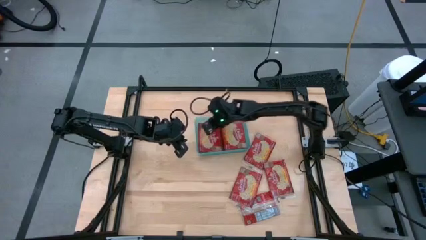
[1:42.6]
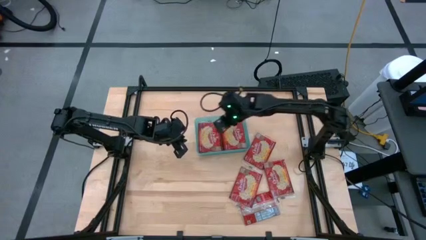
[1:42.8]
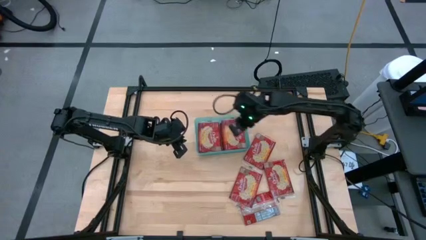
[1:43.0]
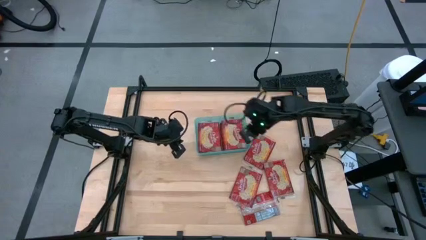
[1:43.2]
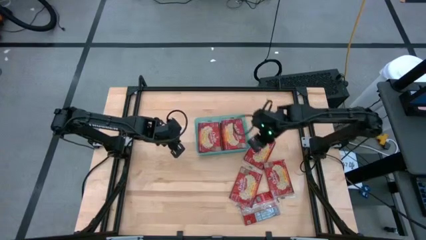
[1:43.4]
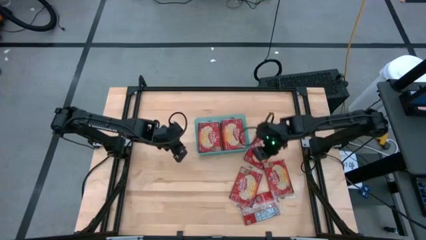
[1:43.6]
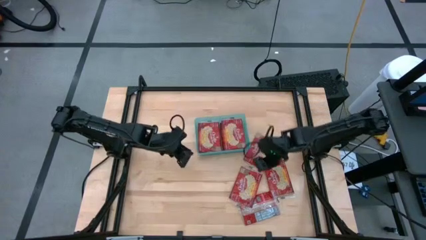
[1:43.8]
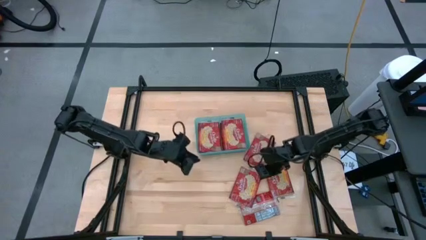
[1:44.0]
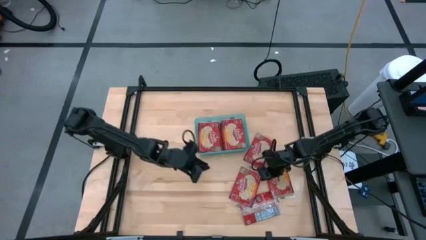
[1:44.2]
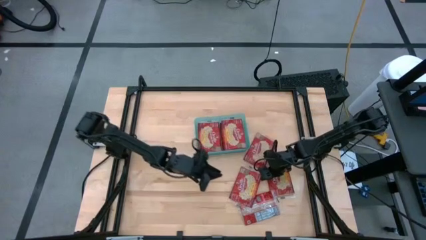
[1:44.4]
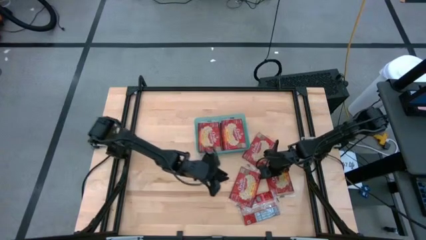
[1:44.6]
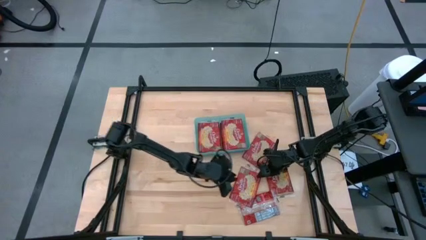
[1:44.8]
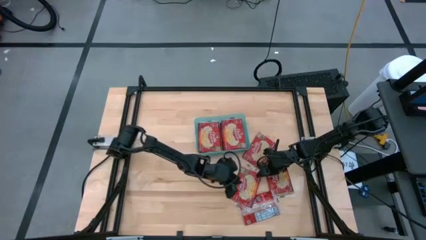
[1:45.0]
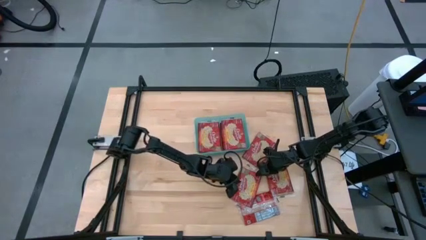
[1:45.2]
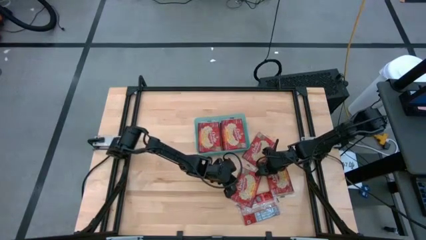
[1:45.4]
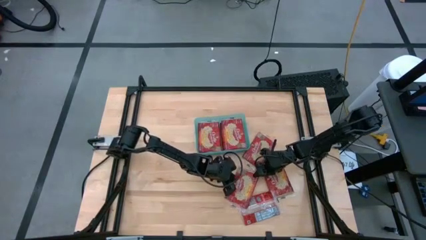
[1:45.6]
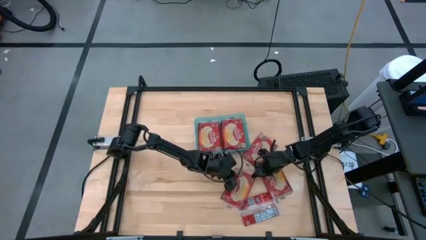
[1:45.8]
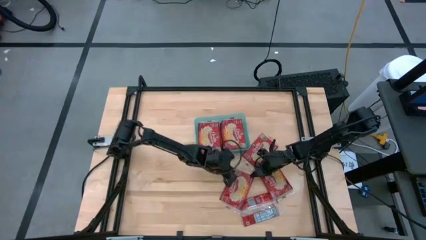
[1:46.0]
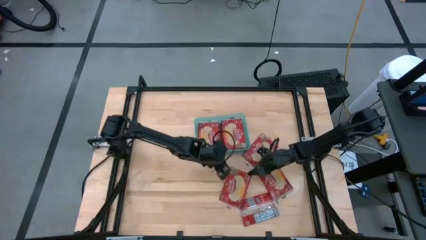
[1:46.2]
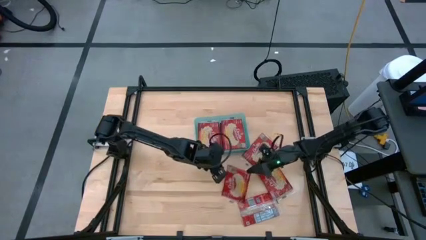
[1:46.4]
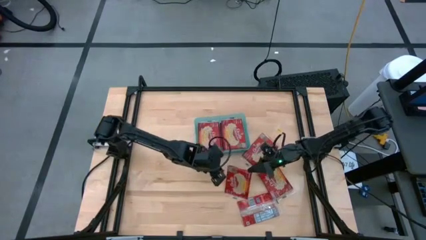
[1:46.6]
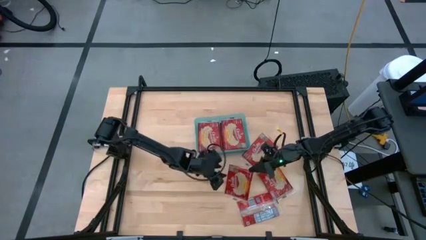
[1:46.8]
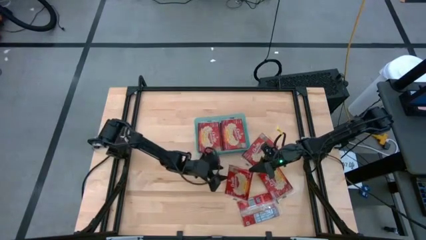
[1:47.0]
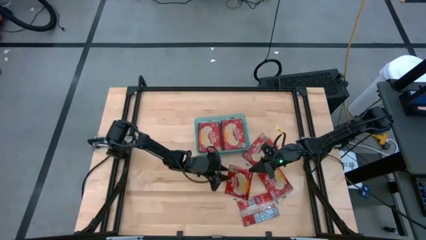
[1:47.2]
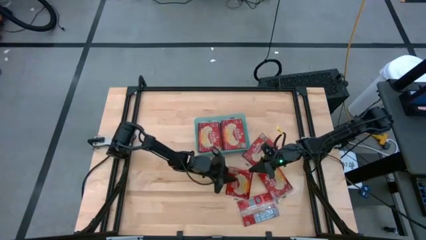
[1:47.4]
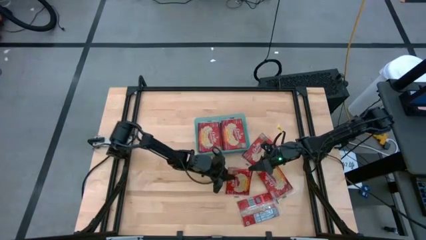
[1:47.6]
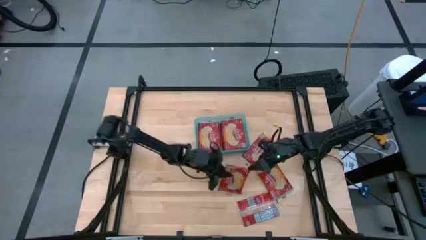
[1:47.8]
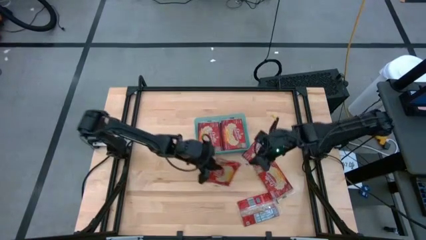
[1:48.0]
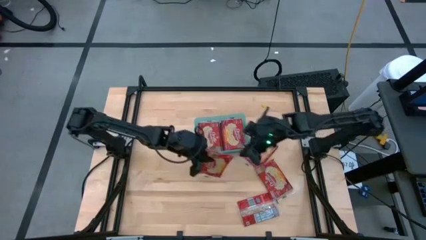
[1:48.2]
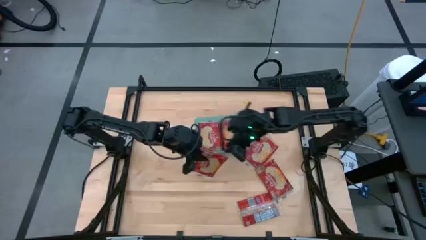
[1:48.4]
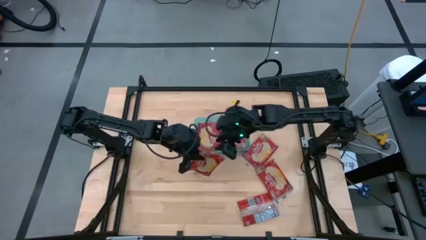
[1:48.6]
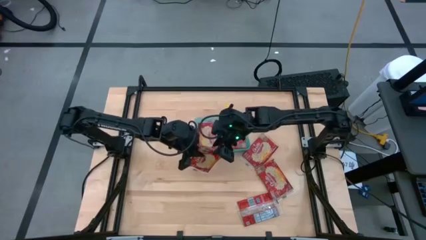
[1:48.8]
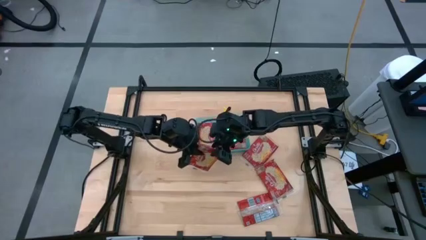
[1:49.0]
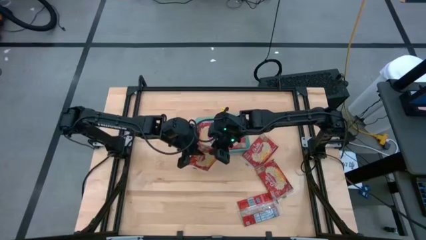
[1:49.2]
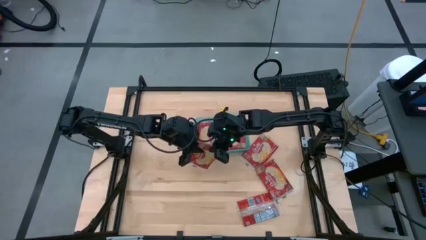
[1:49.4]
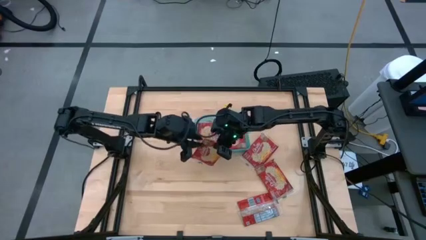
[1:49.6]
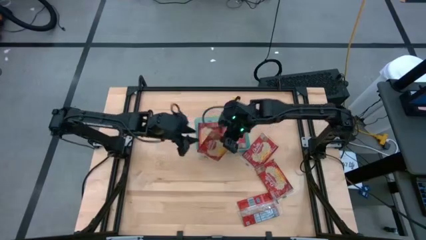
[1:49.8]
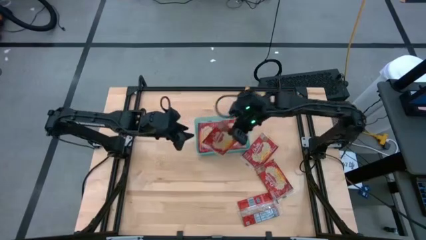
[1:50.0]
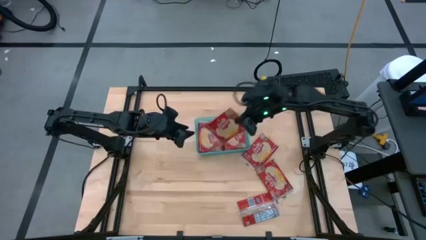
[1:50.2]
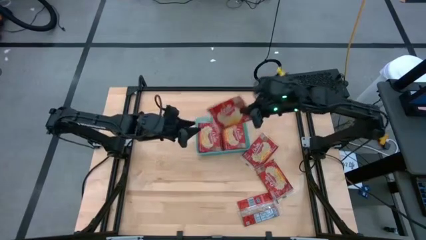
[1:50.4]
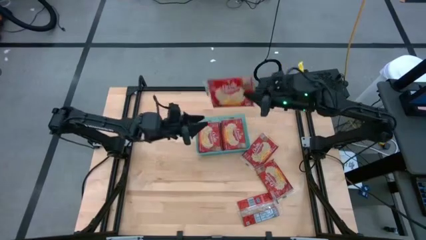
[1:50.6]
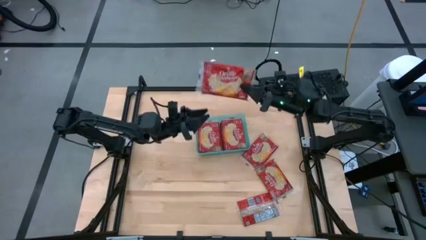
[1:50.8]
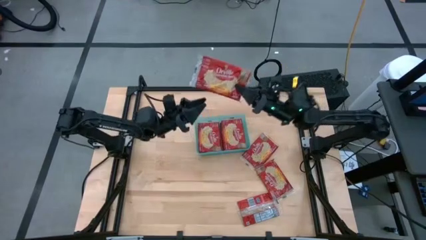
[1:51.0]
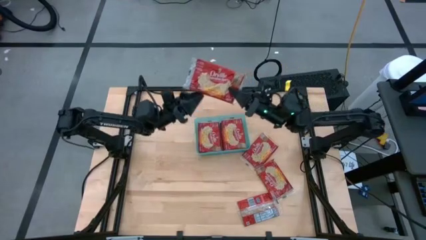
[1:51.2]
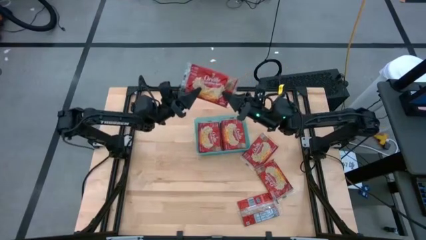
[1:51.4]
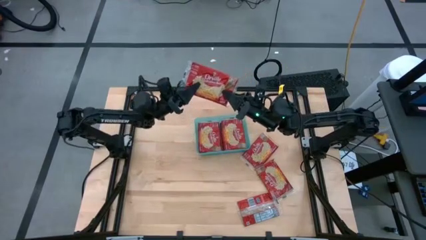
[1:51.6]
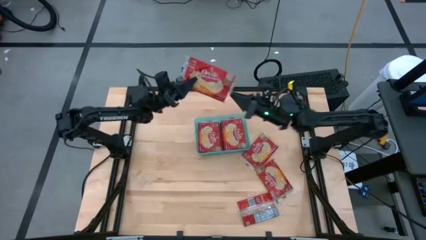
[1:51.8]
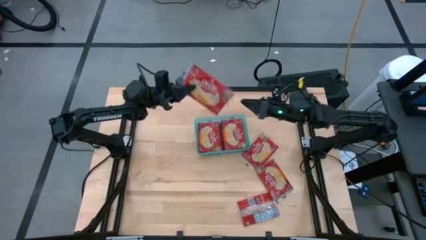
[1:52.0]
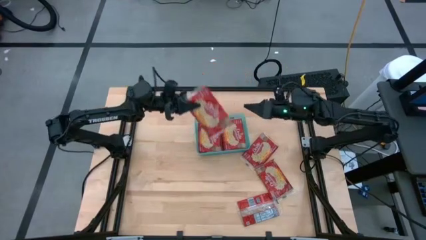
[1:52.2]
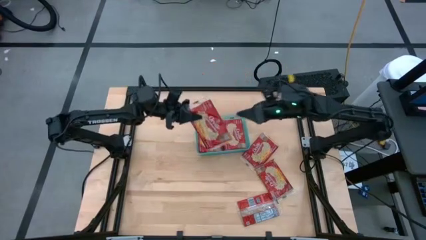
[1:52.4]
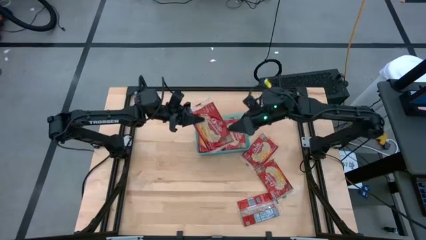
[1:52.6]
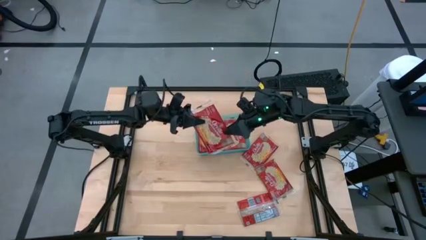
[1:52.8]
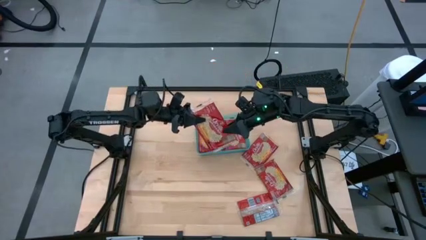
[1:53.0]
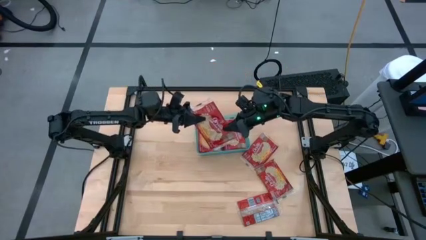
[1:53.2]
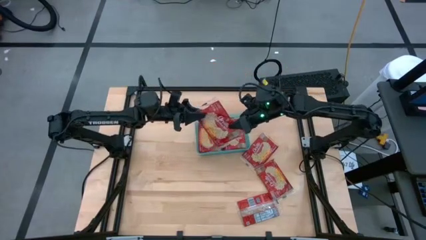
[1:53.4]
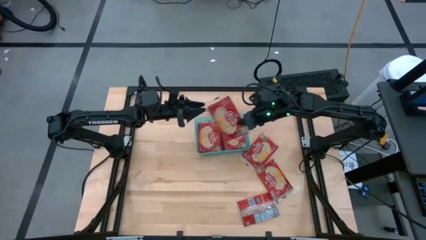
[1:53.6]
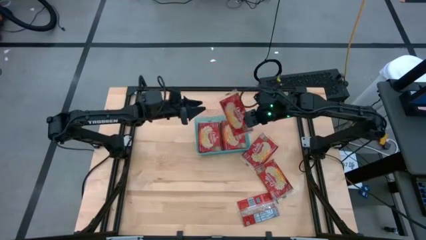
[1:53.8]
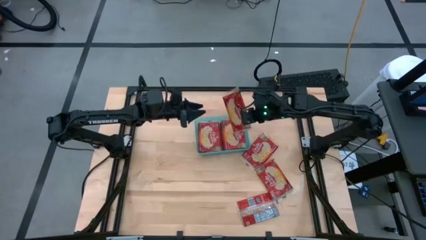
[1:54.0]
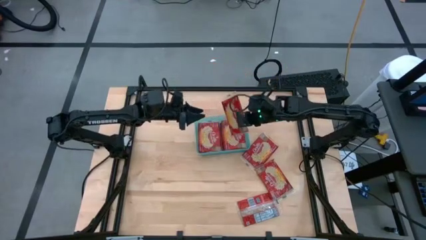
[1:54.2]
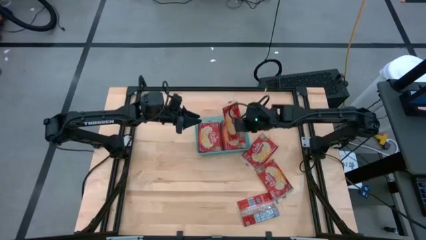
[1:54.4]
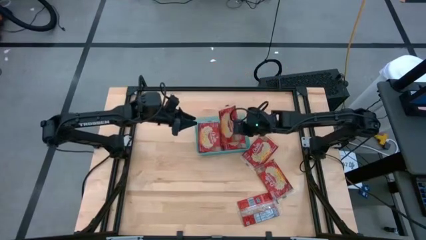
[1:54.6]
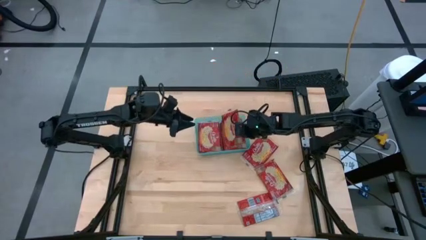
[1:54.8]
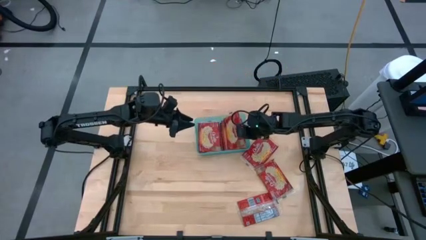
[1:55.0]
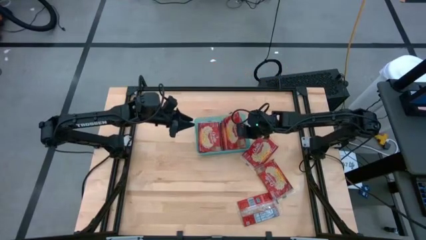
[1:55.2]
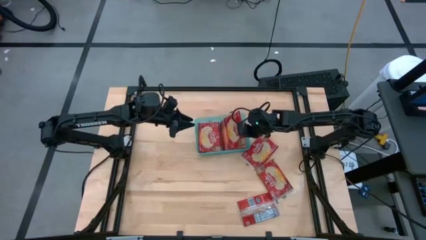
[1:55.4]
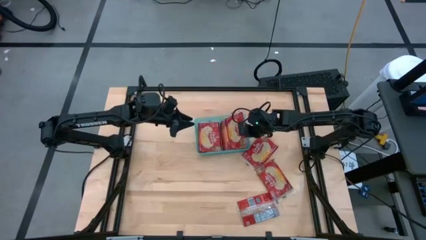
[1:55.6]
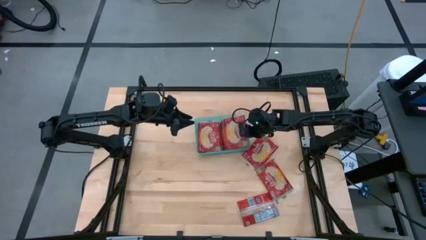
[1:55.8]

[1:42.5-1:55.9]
Task: Sort popcorn bags into baskets
Put the red popcorn bag into the green bin
